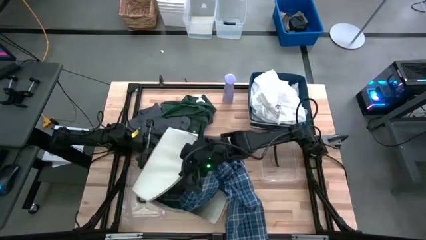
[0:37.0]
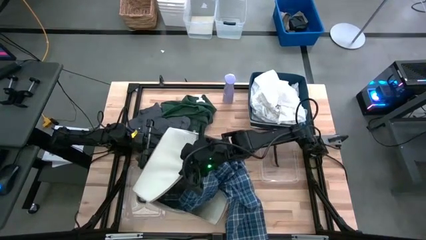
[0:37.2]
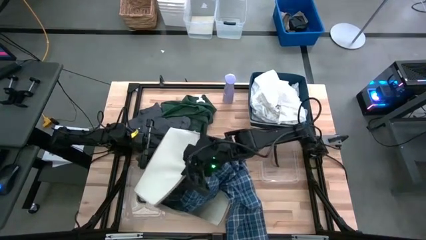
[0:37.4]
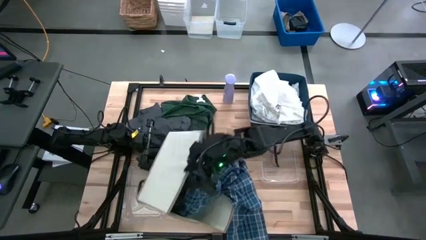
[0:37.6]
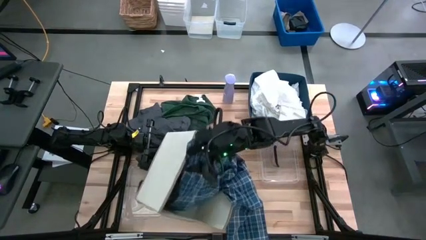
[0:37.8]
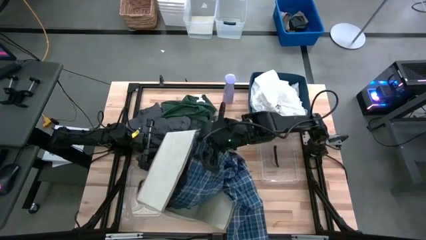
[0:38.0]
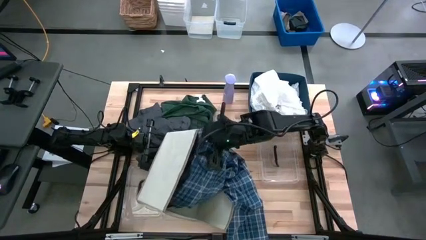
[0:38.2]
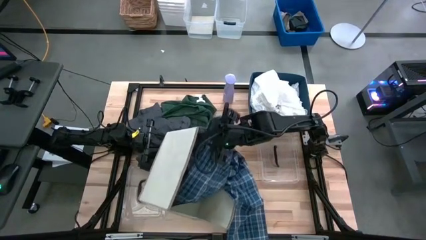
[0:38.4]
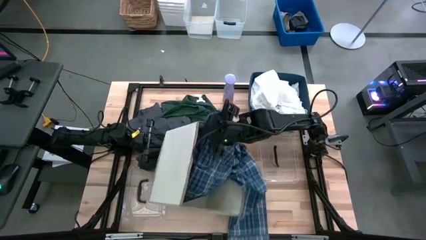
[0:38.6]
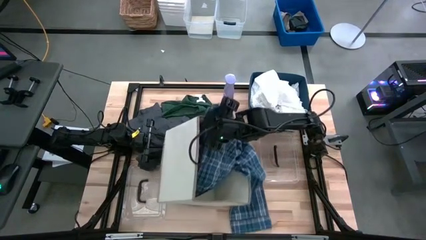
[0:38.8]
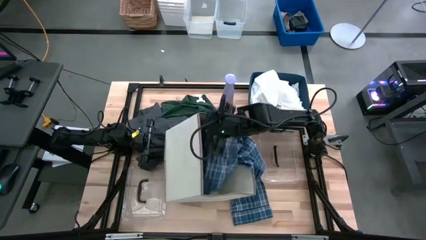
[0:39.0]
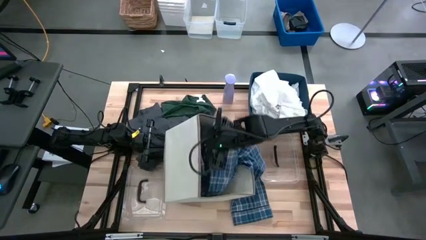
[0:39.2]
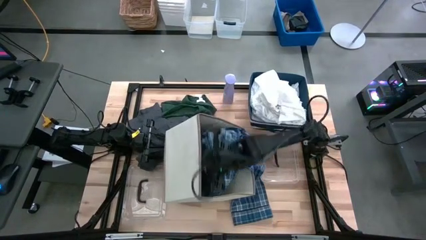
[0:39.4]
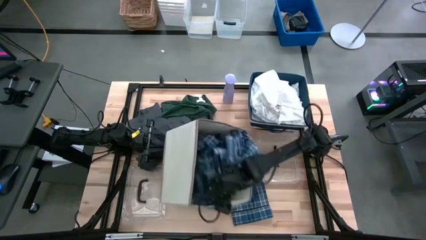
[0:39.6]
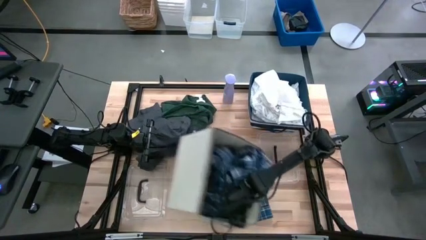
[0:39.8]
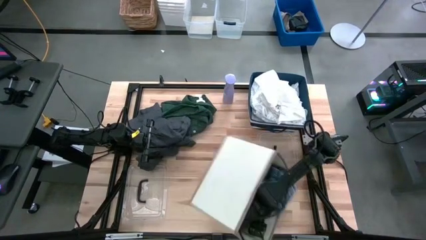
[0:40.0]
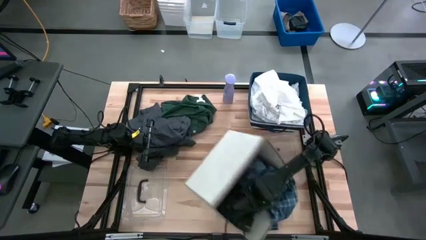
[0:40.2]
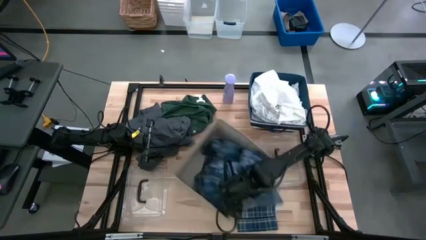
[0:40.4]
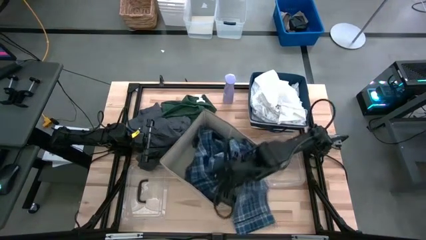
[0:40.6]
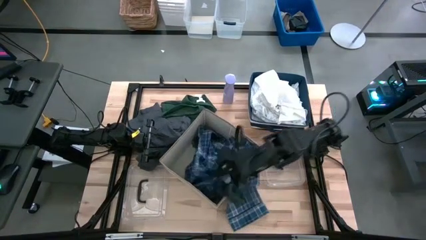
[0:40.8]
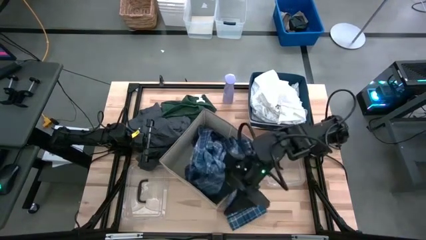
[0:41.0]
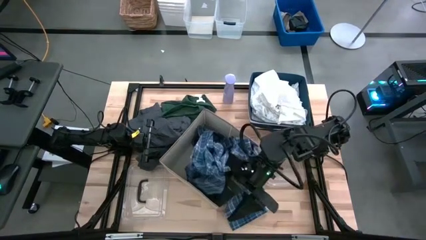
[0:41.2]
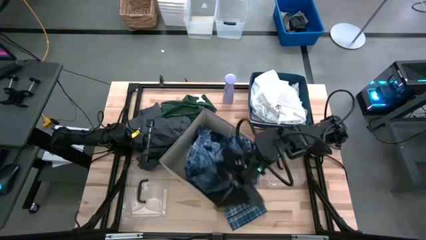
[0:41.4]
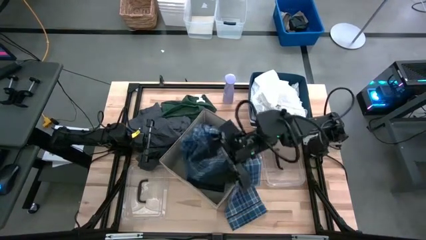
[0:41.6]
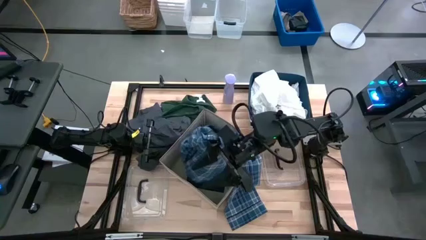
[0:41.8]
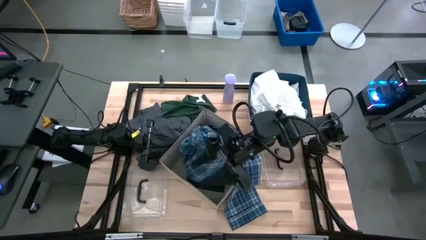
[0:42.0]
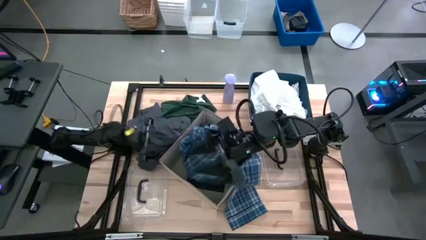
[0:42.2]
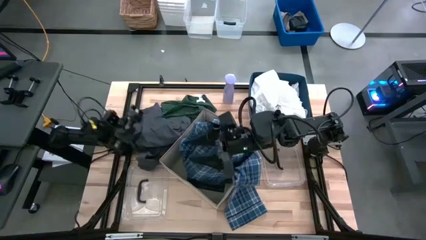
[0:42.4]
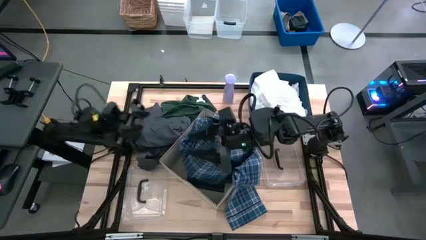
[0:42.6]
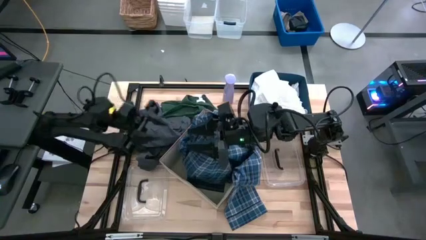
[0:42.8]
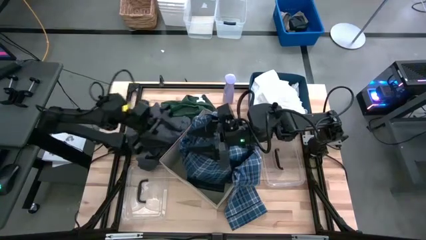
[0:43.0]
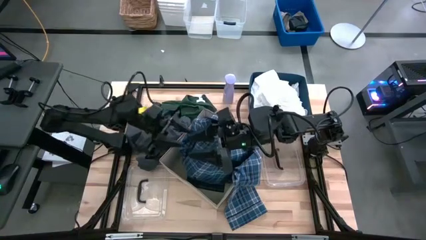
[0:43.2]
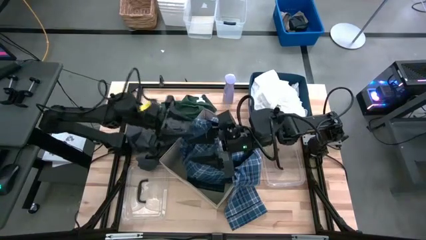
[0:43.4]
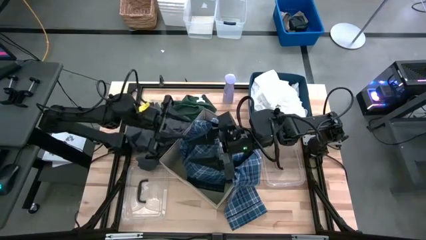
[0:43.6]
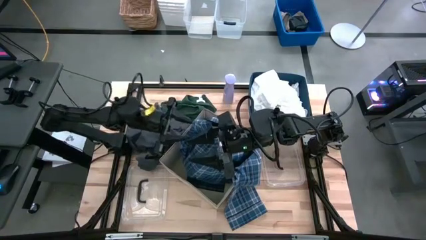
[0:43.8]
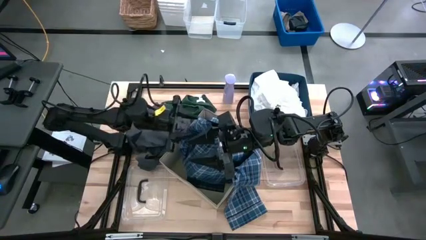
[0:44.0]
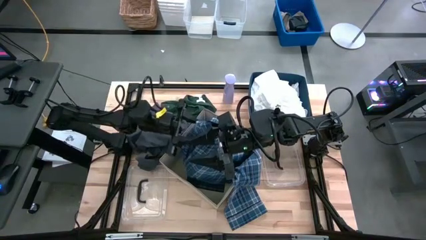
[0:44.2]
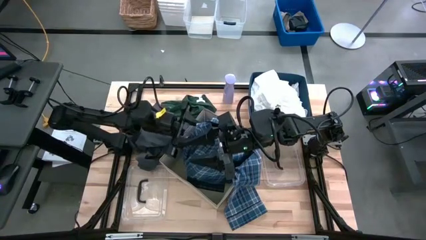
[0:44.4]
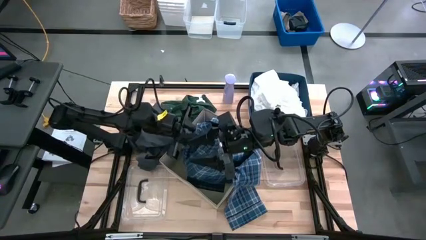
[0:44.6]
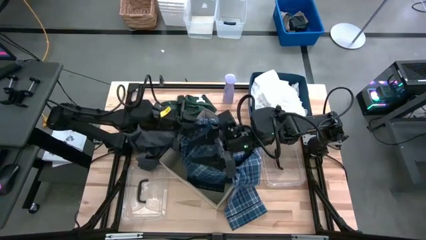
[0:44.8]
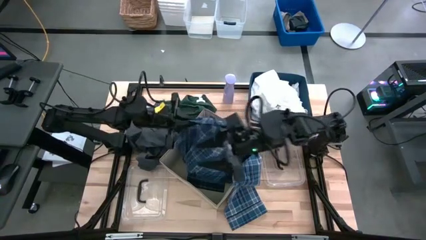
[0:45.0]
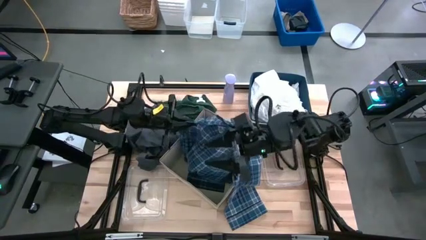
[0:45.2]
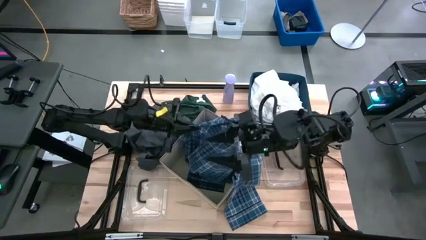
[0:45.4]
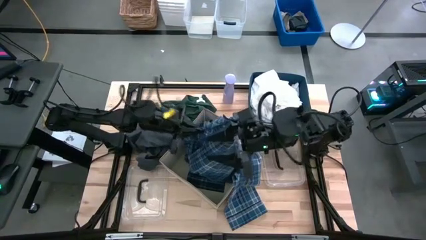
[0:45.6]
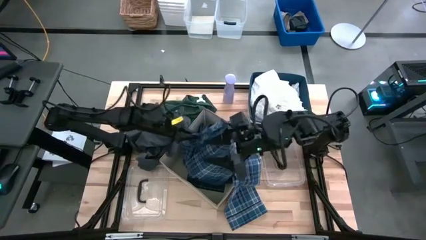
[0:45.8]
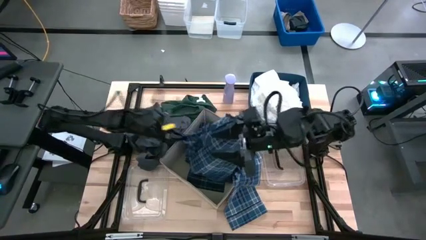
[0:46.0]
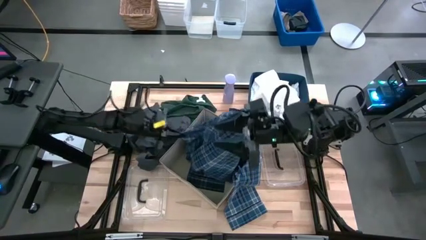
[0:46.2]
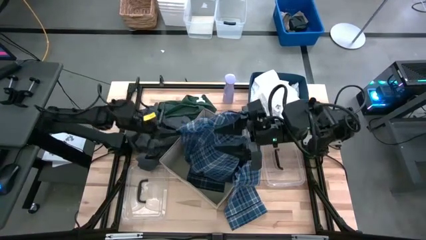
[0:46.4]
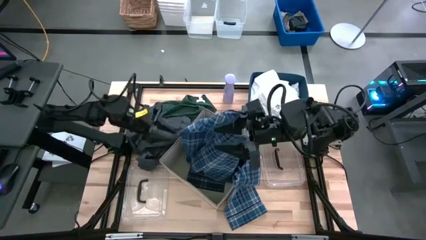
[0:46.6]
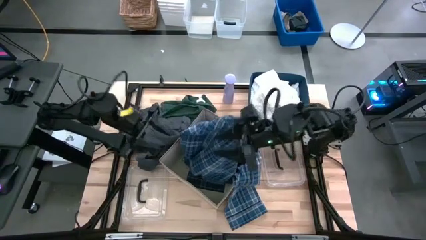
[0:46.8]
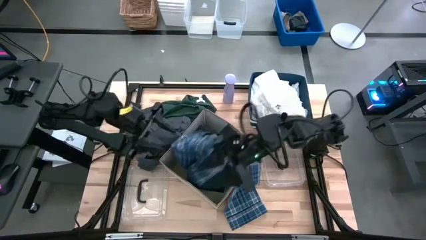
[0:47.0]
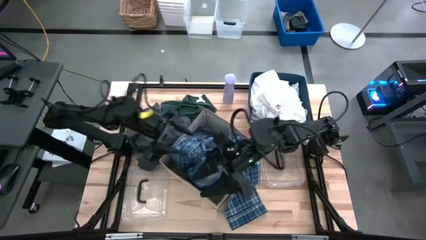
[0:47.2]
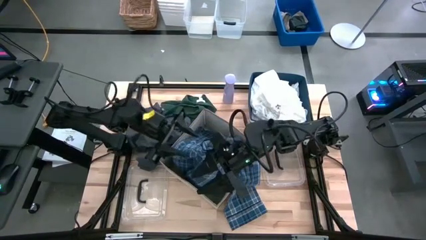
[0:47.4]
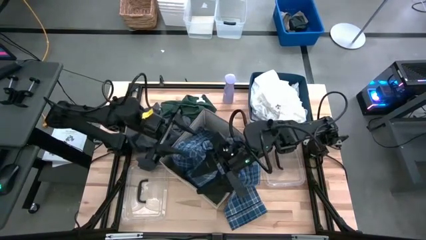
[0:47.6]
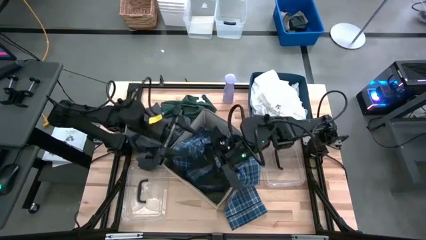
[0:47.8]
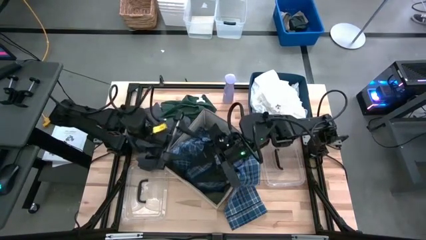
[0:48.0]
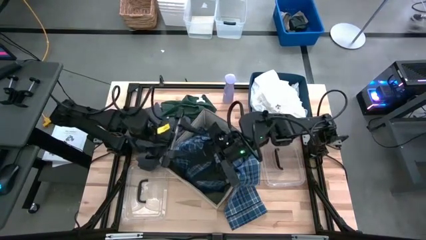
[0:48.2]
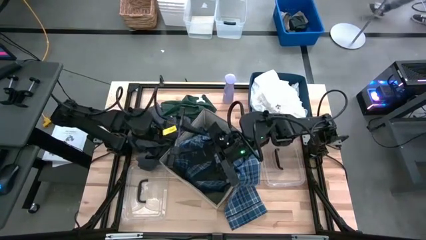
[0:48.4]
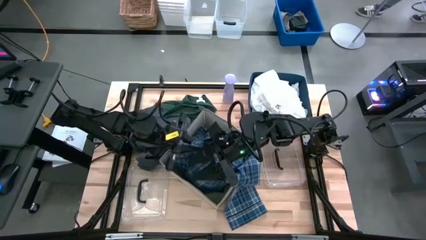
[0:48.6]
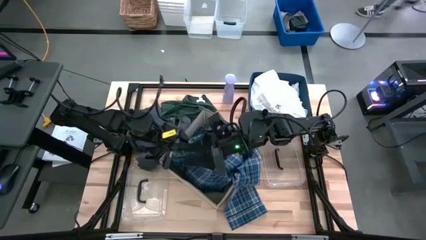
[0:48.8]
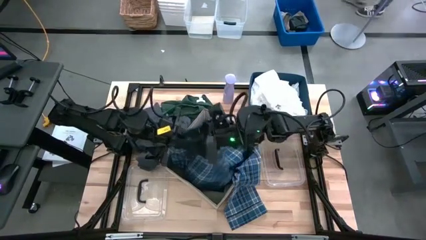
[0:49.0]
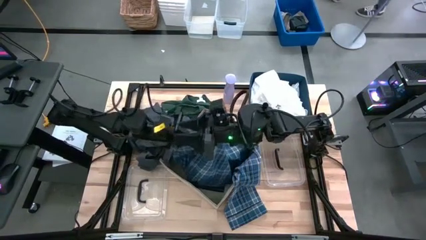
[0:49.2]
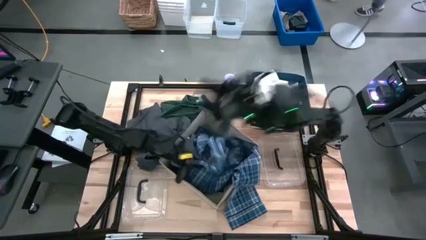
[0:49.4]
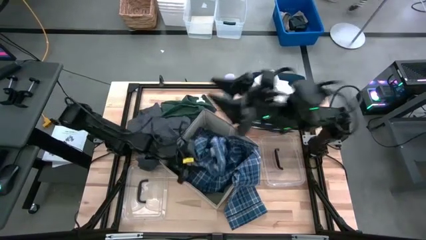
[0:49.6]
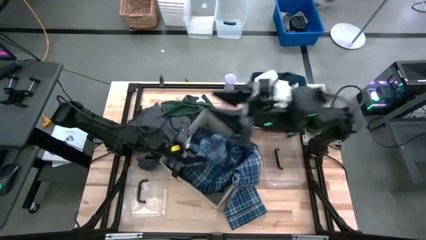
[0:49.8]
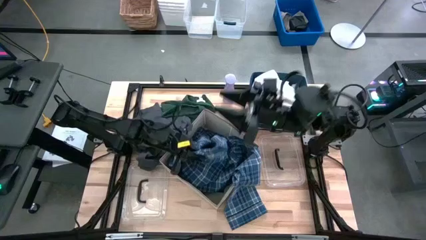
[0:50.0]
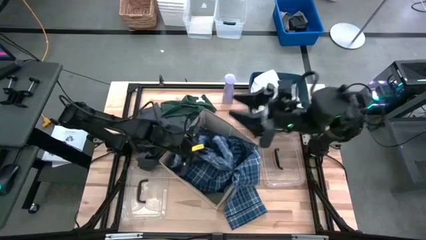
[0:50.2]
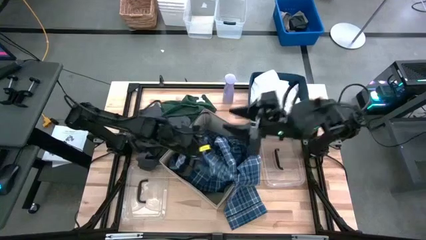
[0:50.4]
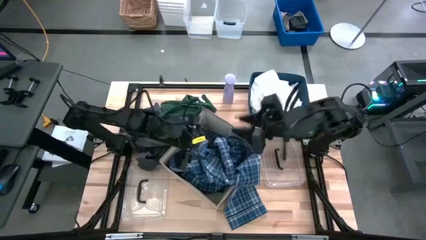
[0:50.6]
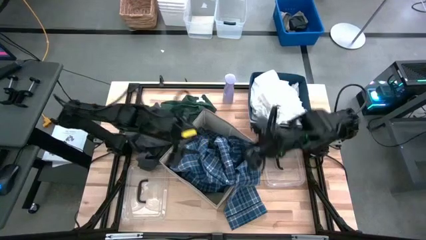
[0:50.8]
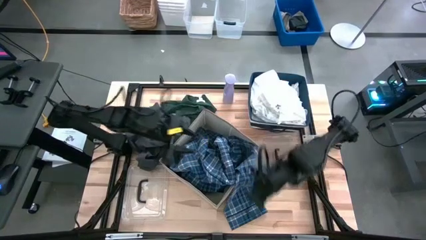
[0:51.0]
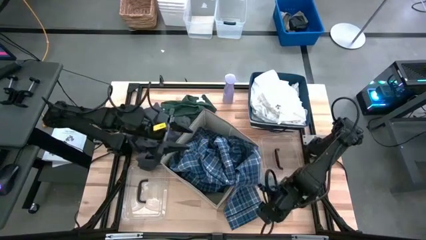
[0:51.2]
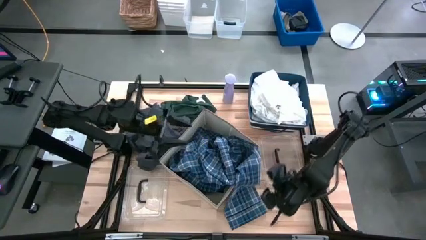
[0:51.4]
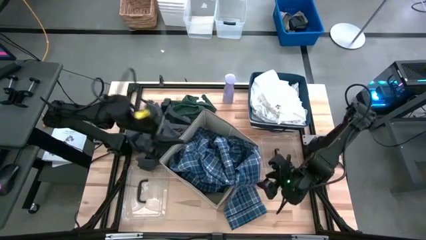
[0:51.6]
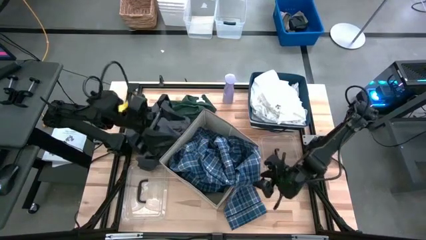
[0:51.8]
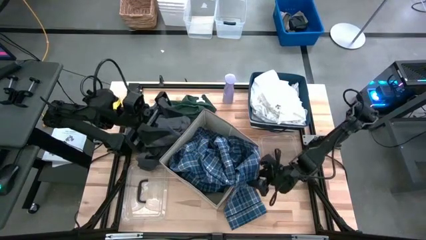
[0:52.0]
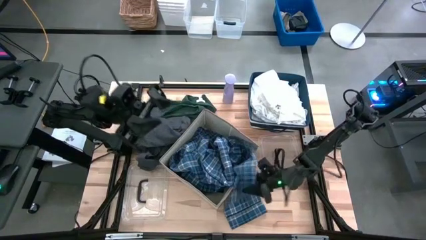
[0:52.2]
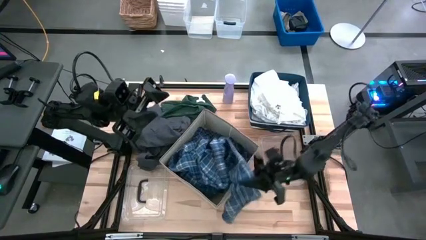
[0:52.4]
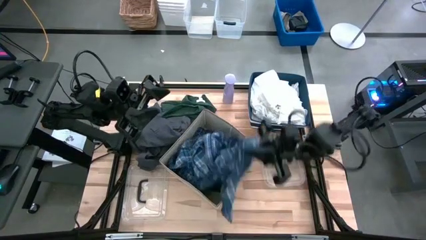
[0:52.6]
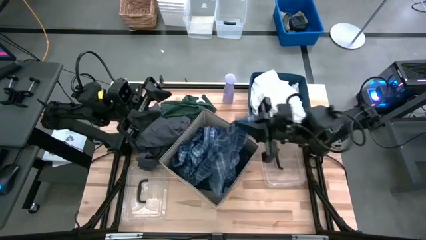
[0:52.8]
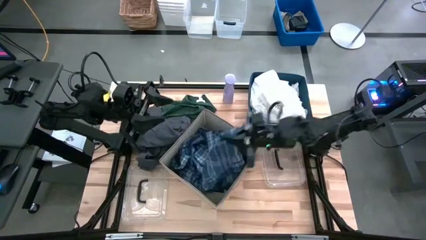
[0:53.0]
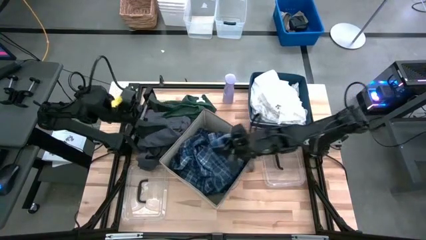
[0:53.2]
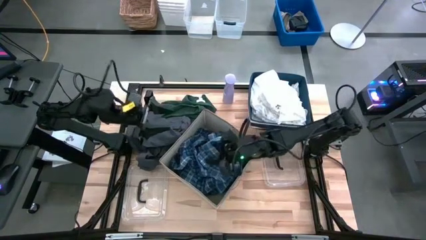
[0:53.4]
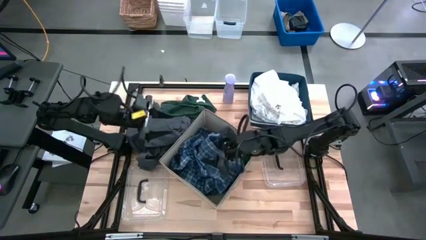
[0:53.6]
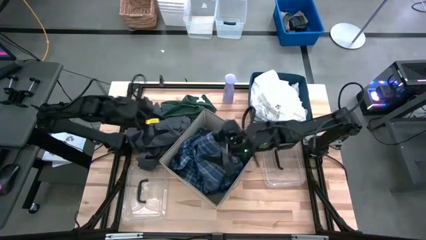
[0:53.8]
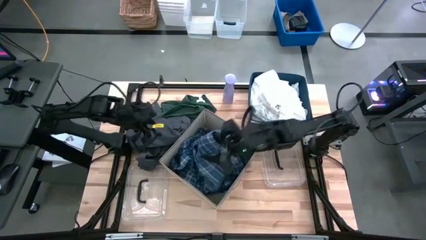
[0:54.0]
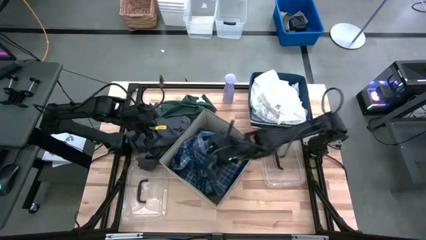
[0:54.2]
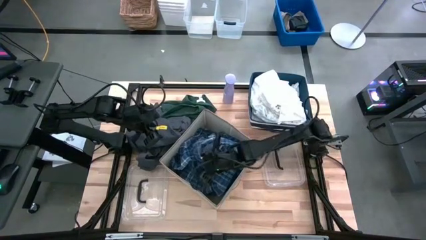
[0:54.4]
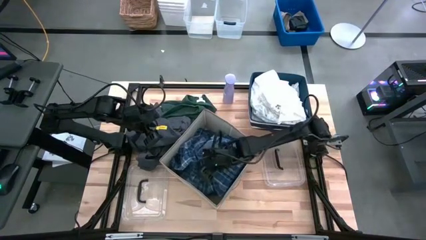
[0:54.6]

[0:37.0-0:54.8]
Task: Sort clothes
Put the navy blue striped cloth into the laundry organizer
